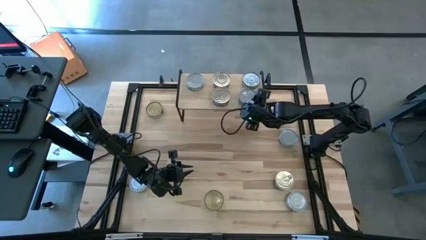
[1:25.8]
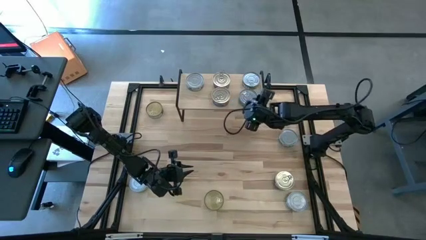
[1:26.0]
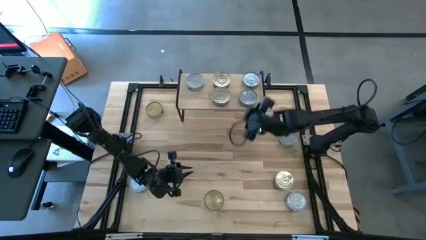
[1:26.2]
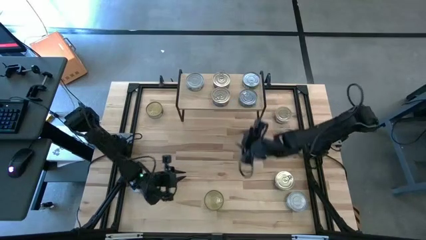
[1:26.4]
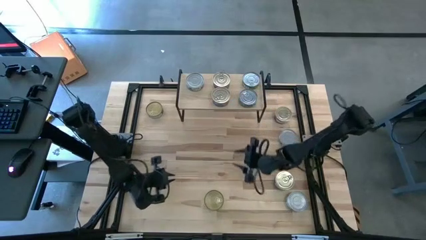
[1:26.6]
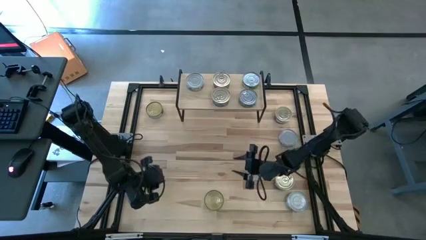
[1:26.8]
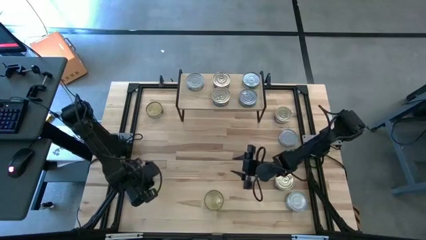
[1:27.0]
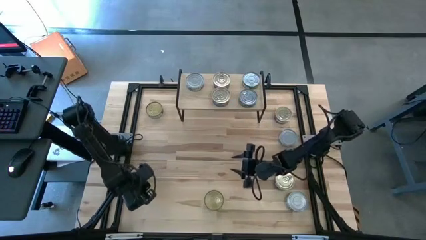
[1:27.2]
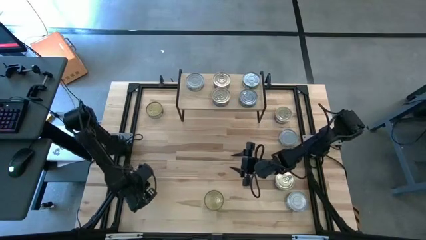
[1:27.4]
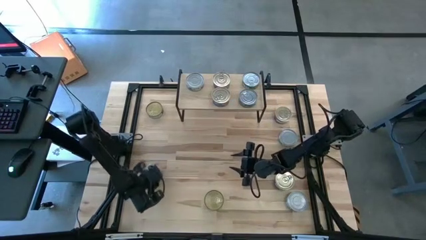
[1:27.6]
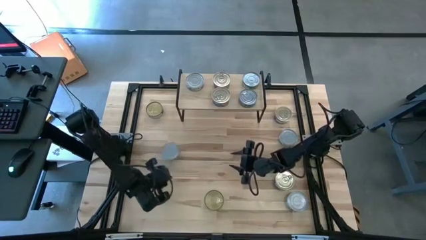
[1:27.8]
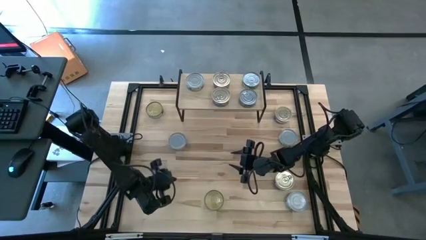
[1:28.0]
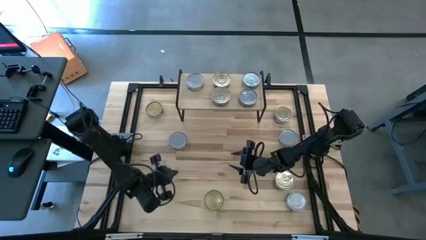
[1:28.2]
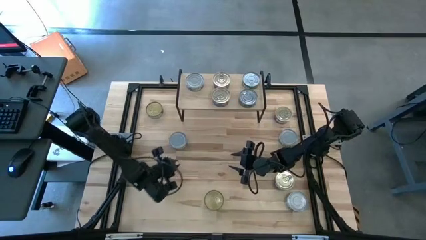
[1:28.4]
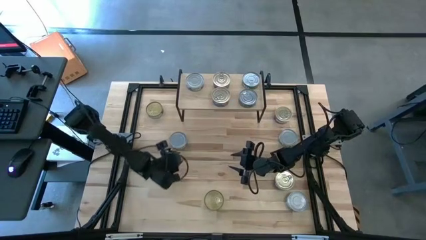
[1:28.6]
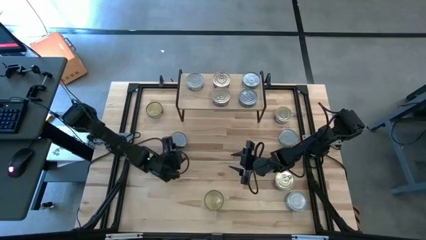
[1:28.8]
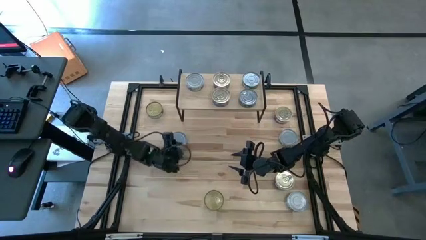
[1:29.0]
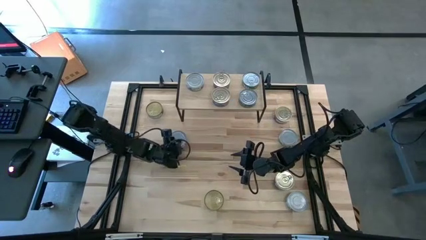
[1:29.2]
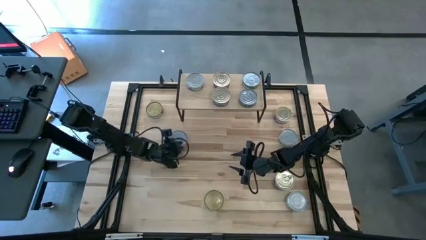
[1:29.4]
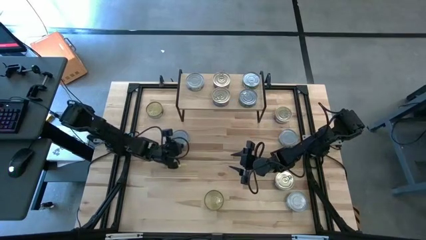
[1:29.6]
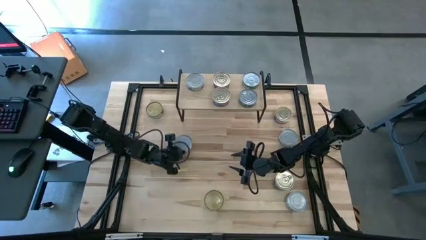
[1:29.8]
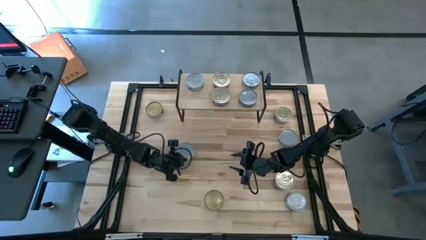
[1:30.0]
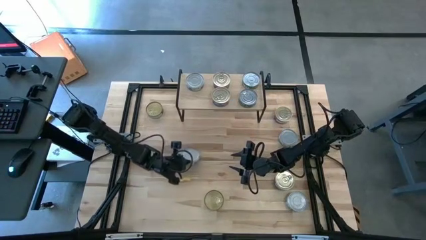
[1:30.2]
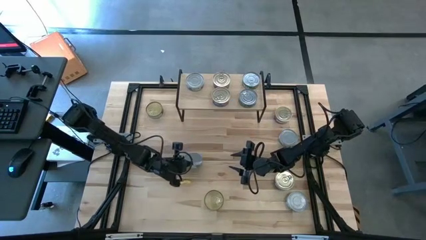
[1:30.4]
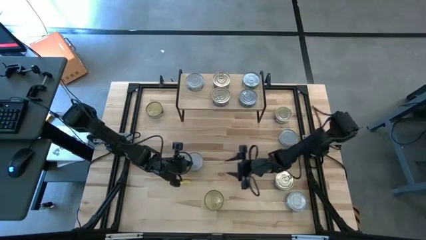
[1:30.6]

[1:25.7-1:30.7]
Task: Stack canned seafood by type on shelf
Put the green white tuna can on the shelf

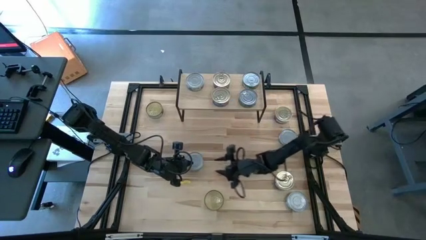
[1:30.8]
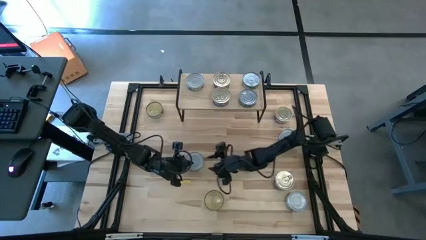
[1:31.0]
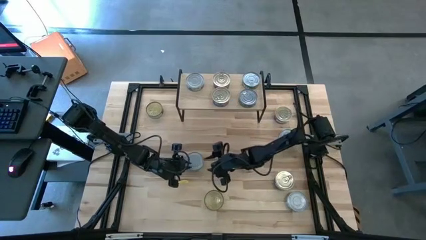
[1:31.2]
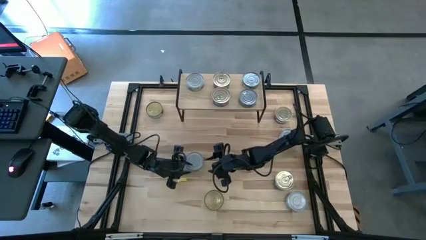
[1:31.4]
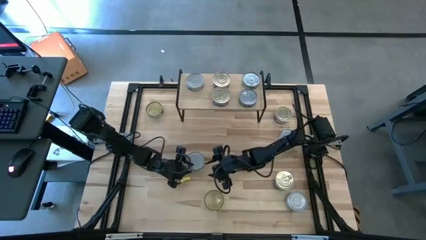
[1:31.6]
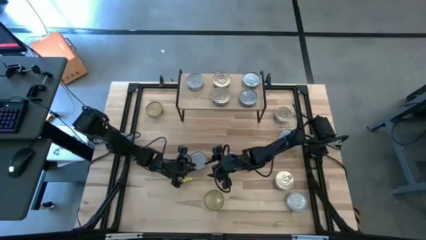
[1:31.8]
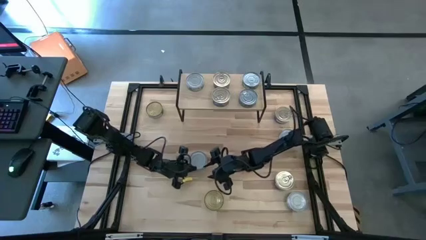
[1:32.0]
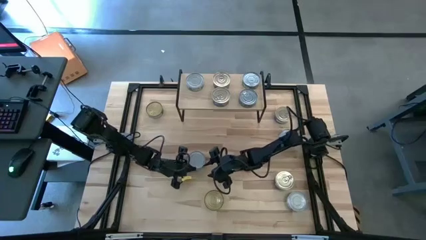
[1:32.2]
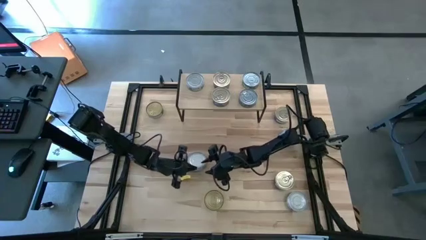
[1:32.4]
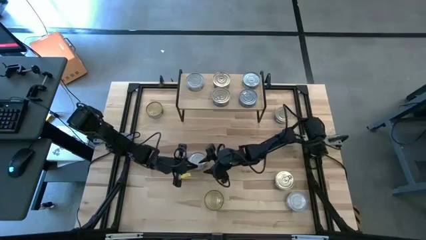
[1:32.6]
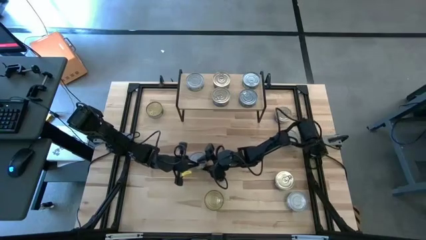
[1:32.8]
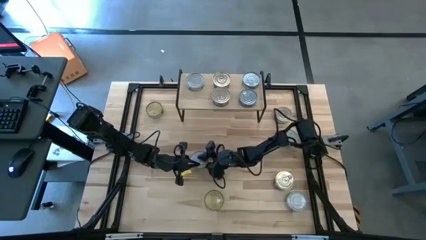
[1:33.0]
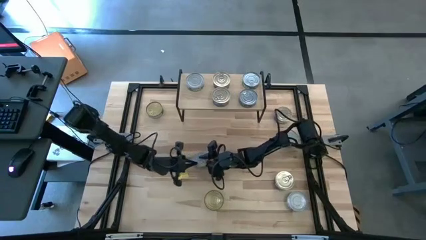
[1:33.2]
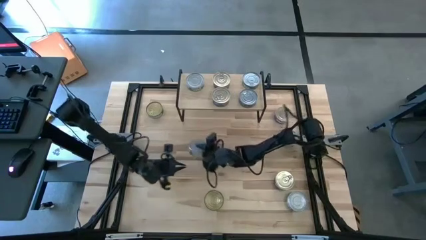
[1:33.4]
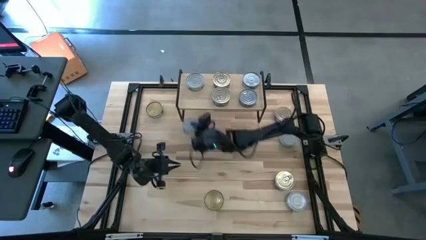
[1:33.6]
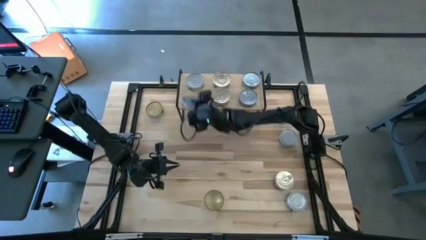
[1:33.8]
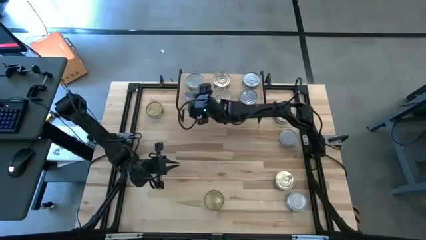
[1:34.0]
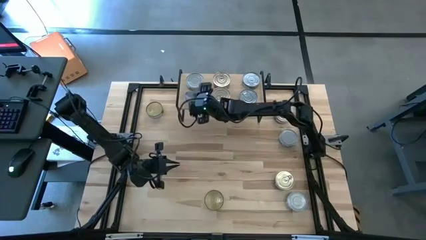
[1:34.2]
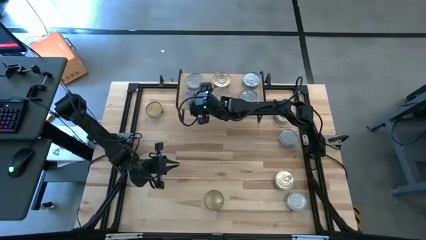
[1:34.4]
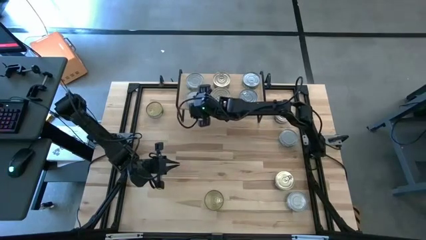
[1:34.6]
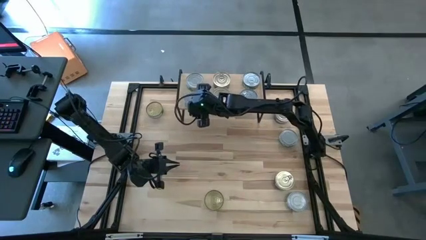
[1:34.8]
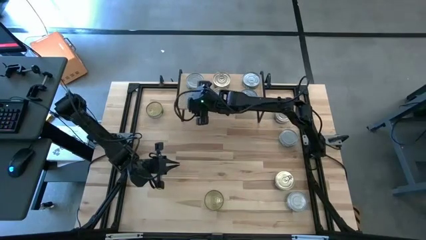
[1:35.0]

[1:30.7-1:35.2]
Put the green white tuna can on the shelf

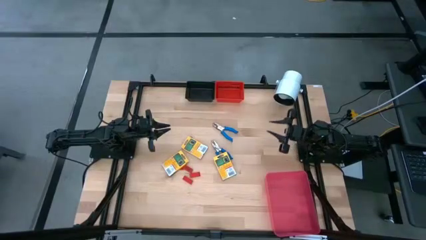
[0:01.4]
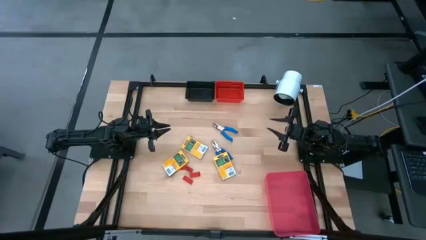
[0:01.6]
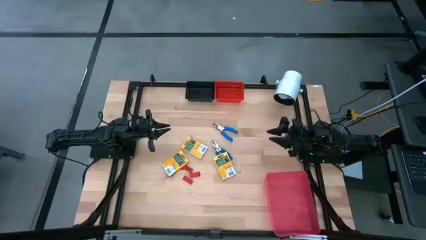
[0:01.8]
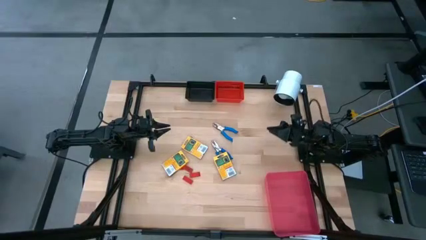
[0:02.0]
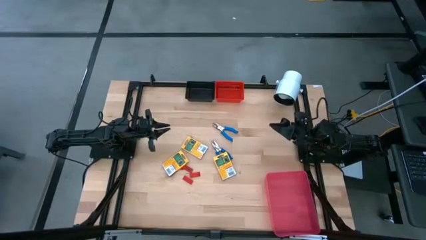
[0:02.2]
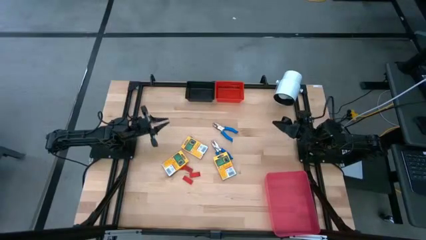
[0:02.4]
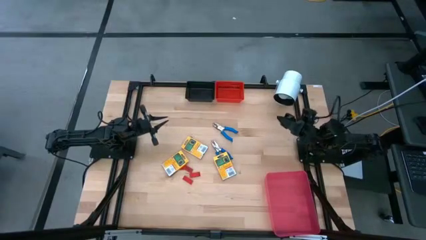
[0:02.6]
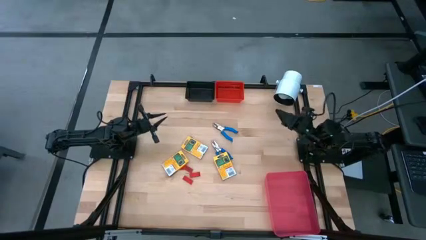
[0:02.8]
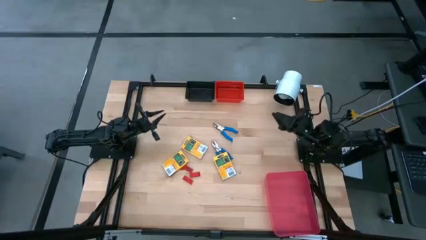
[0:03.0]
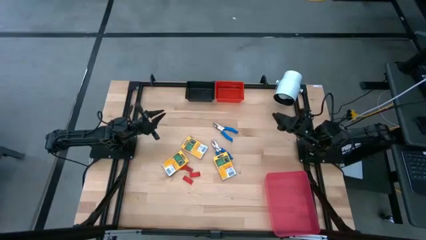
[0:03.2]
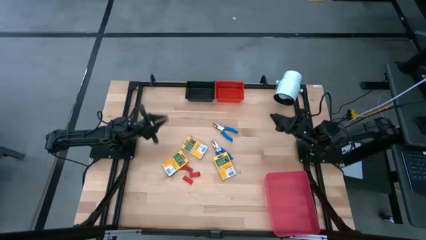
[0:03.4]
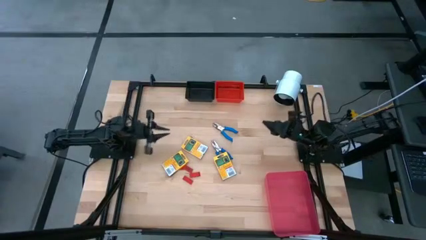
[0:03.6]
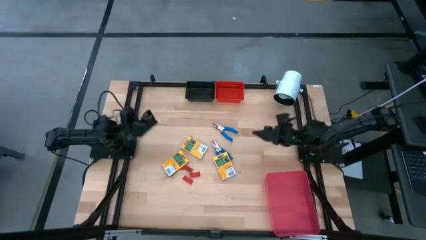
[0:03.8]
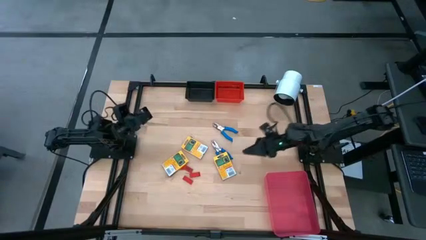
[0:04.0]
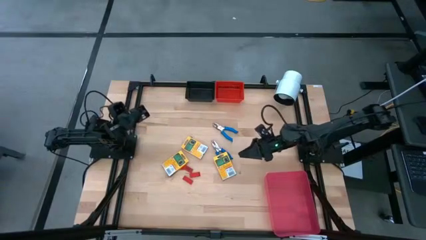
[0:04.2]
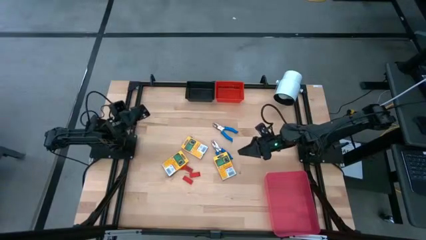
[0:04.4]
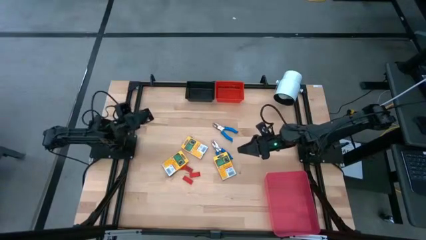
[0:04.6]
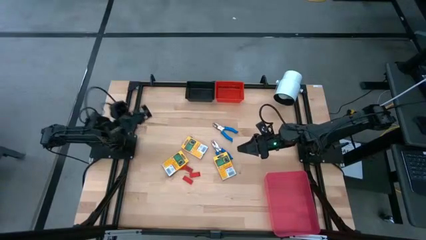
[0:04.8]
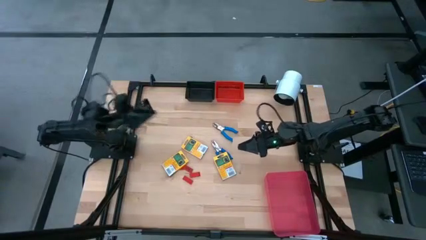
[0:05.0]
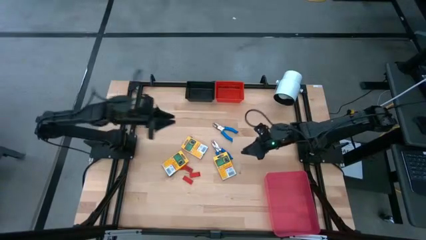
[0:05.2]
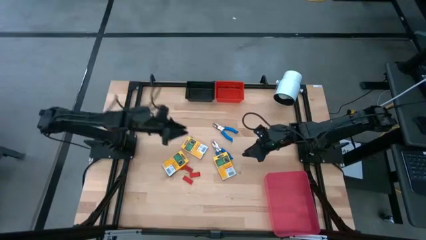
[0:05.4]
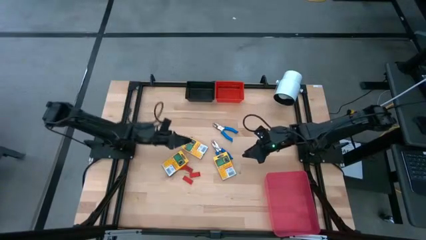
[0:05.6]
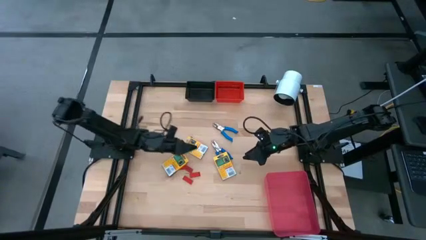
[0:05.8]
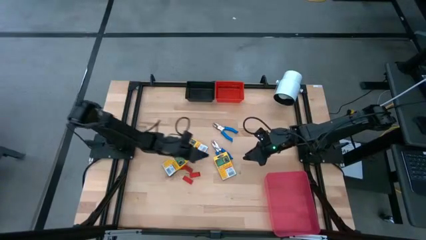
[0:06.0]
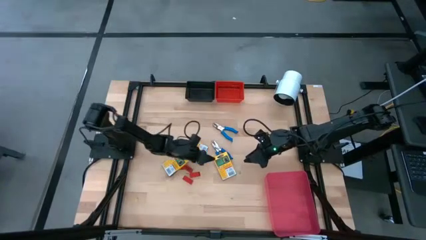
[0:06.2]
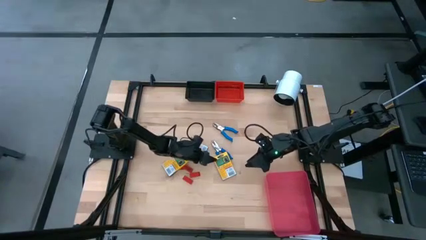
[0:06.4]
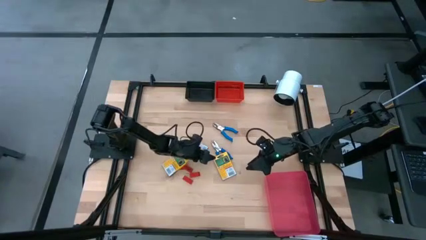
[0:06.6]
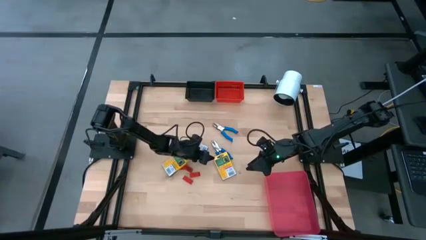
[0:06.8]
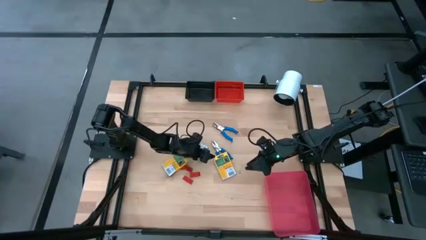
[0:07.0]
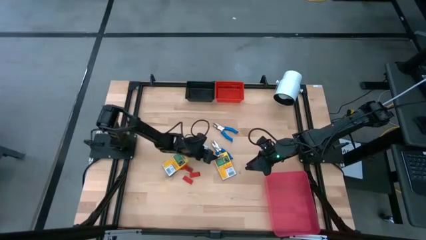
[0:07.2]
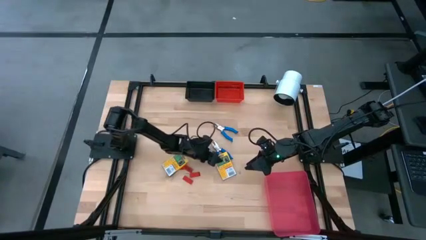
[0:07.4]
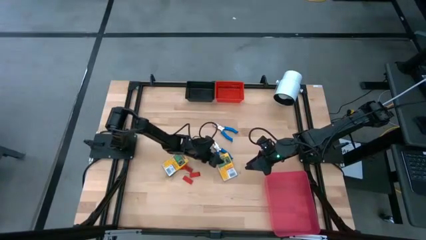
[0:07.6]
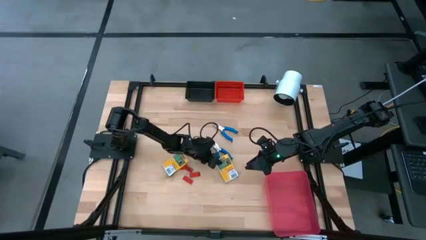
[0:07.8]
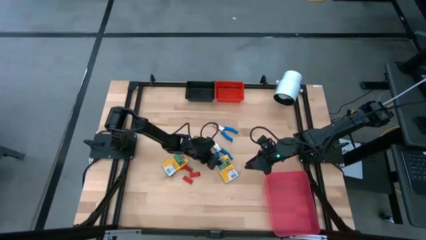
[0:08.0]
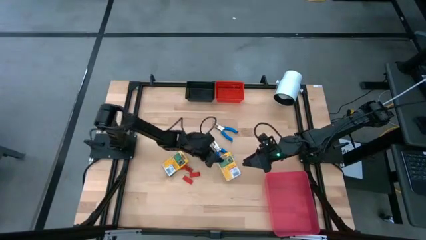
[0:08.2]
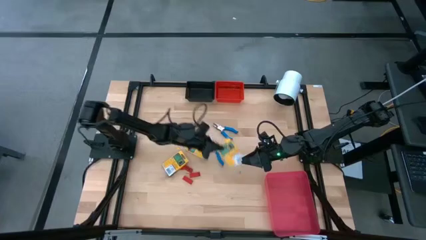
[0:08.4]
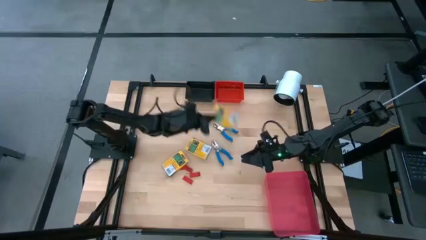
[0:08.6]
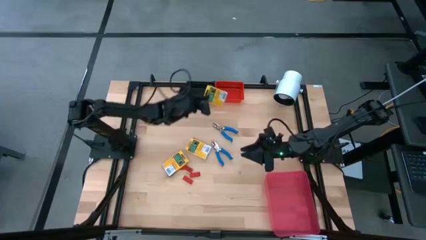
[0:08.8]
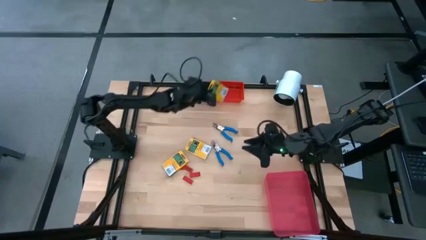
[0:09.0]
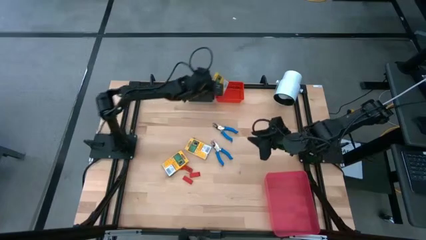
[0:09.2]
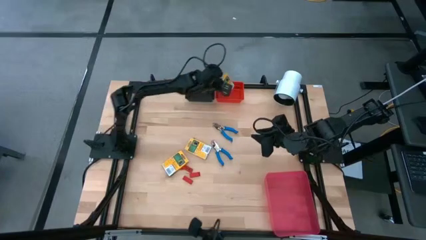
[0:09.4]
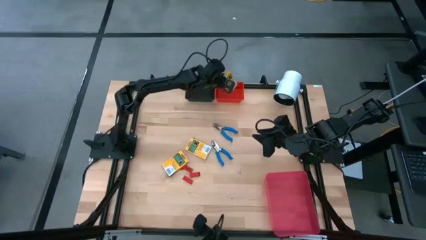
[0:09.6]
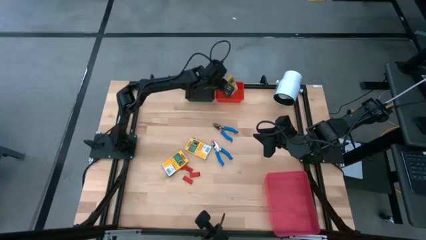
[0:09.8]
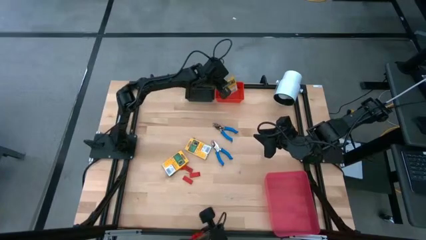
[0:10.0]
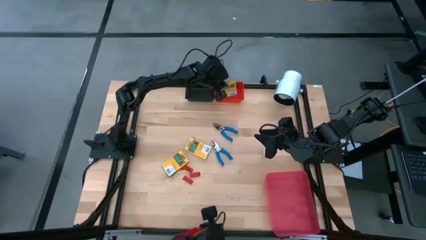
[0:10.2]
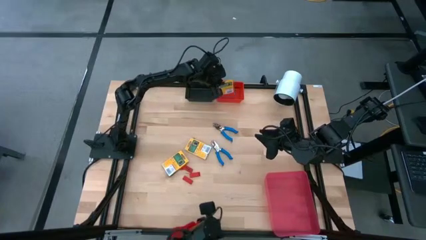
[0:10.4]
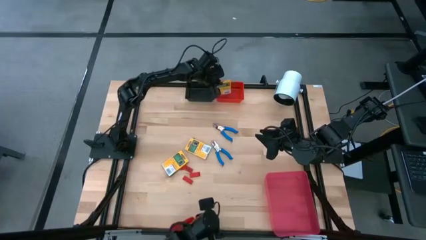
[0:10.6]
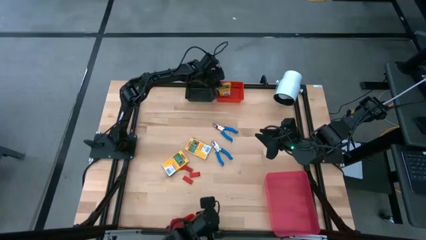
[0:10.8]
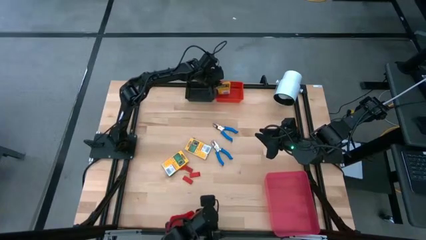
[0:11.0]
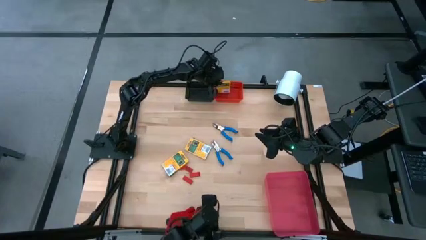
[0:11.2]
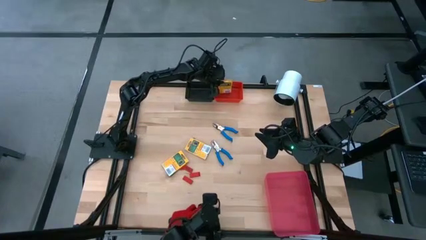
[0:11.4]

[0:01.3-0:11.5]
Task: Pick & Place School Supplies
Put the yellow crayon box into the red bin
